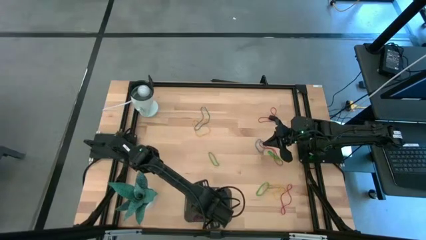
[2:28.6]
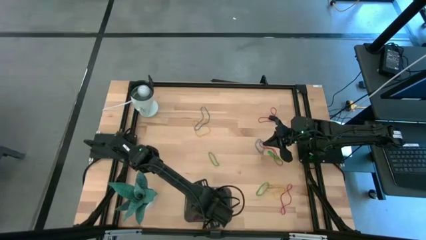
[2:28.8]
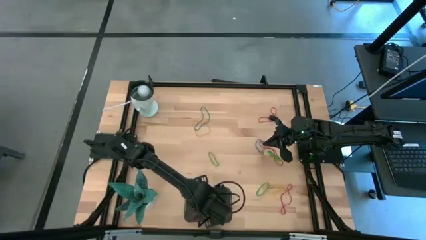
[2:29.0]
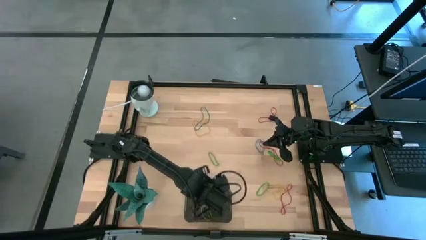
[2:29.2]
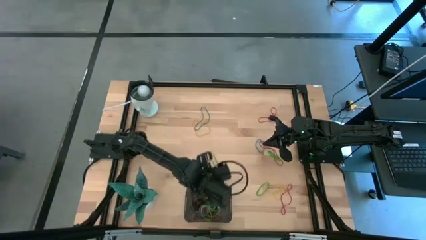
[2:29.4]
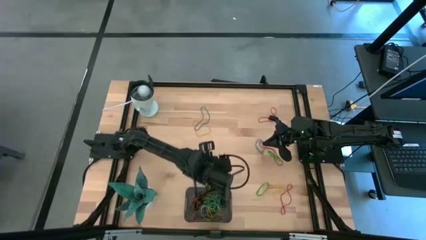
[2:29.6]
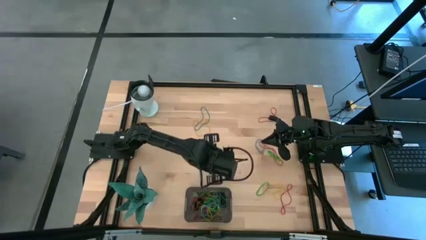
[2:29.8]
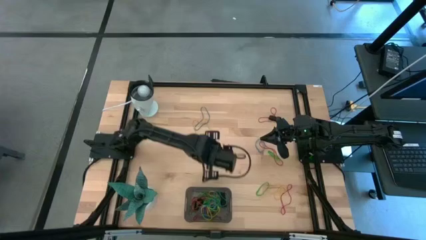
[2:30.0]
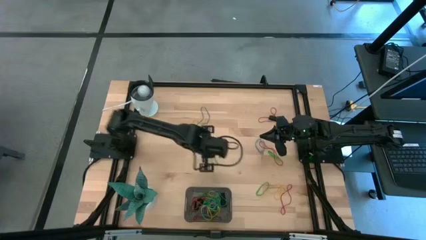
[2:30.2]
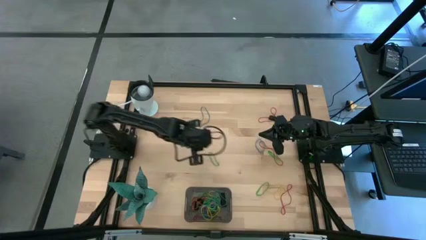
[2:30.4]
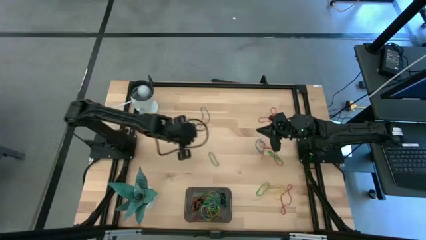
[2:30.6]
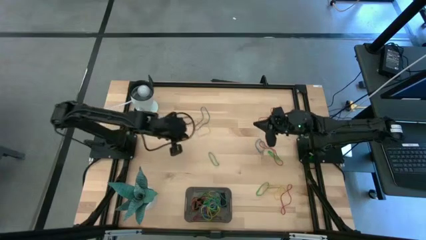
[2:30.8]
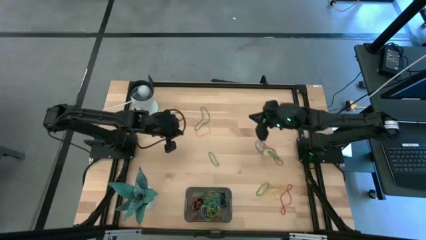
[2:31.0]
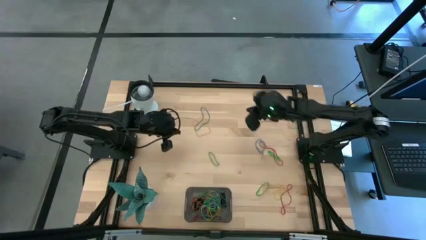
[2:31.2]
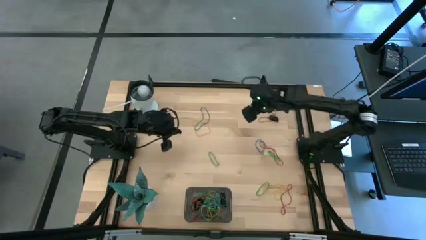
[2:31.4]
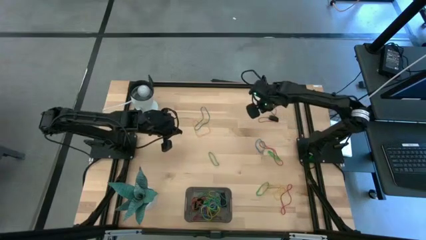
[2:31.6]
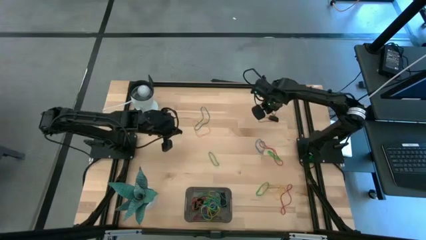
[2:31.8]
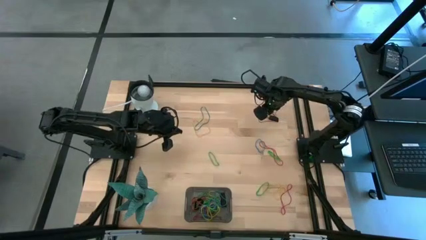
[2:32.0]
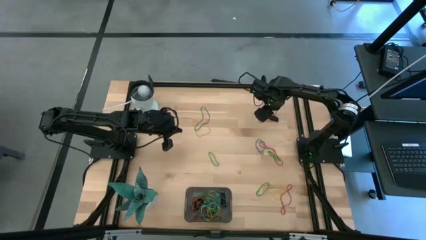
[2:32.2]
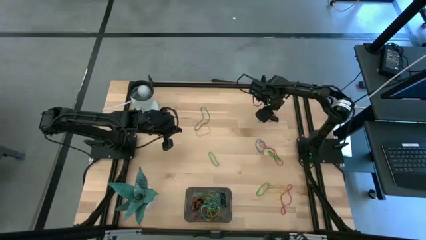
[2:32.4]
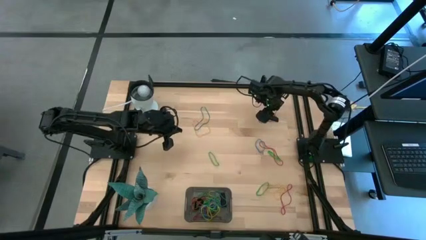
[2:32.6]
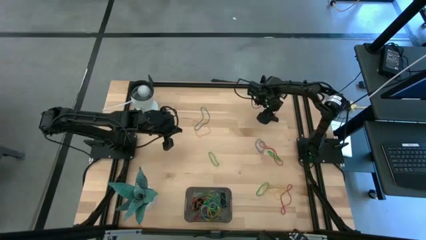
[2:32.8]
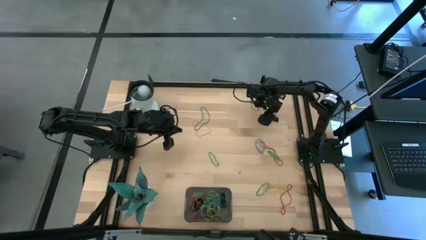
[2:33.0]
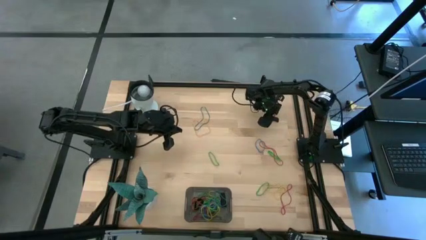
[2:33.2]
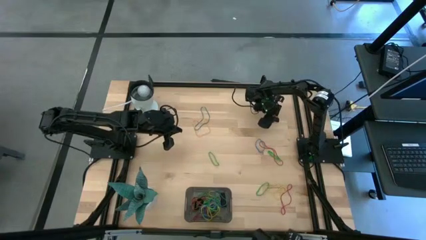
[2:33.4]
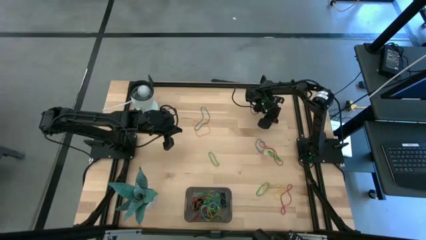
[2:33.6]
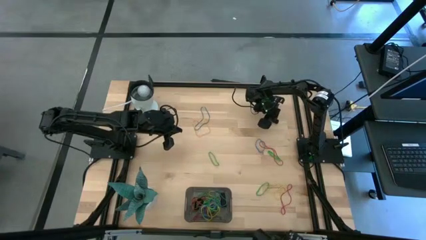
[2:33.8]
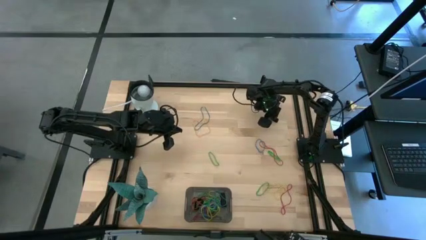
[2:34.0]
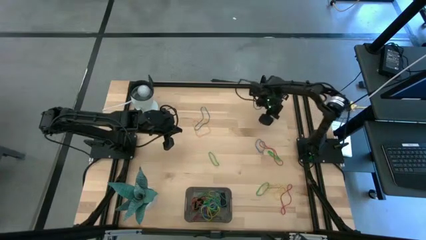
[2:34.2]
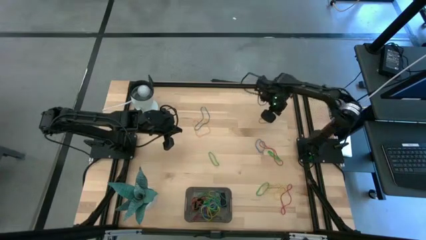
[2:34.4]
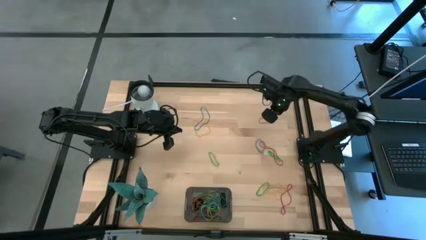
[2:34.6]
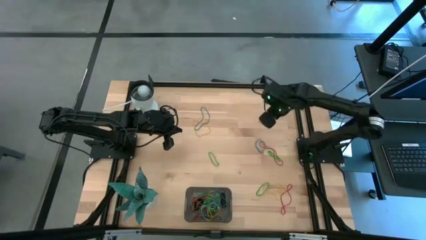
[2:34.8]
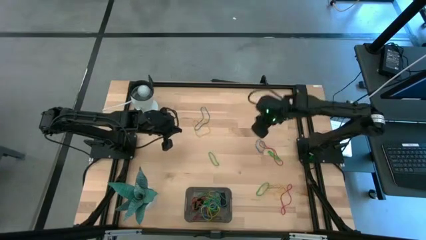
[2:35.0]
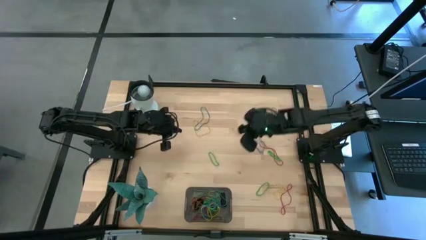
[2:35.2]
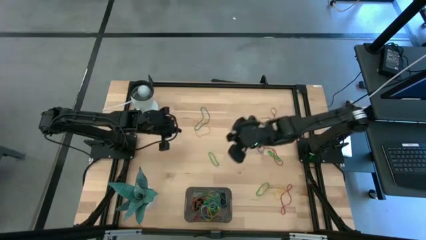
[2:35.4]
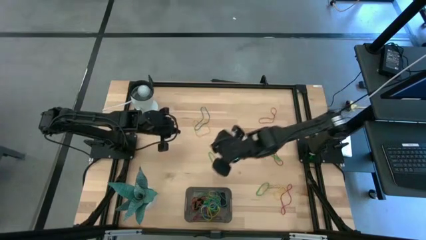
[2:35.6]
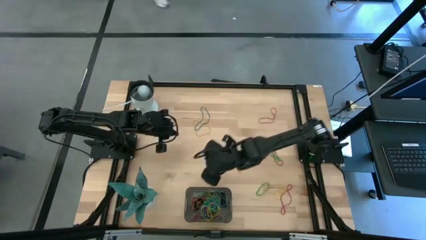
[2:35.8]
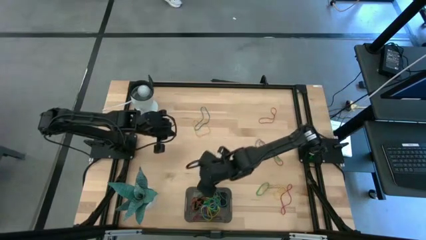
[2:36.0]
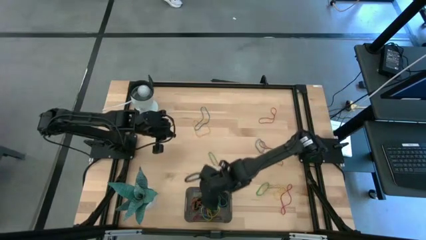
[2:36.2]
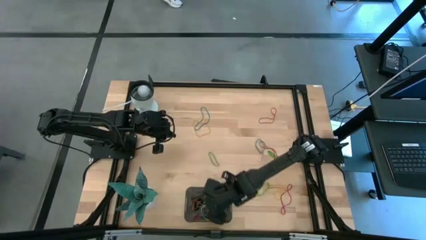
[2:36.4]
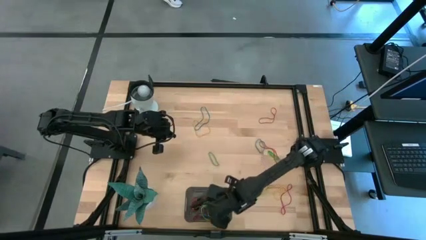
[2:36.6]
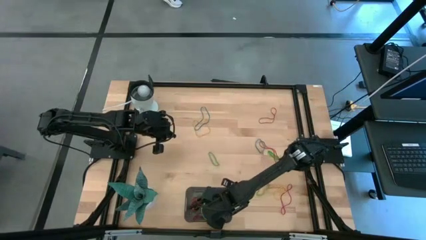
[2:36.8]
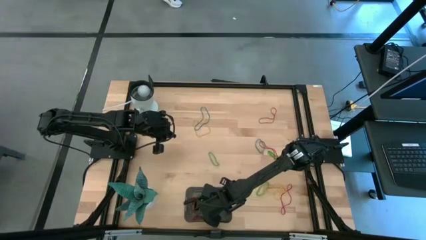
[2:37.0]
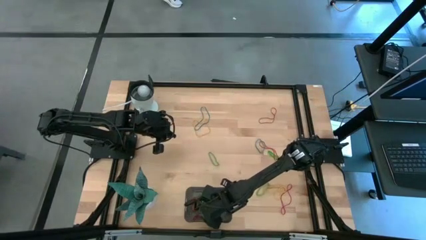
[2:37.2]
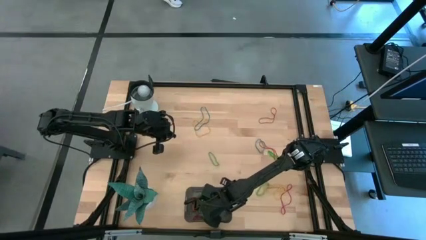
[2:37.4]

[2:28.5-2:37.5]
Task: Pick and place rubber bands into bin
Put the black rubber band into the black bin

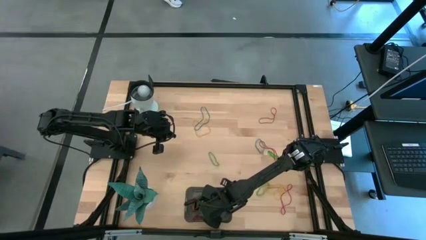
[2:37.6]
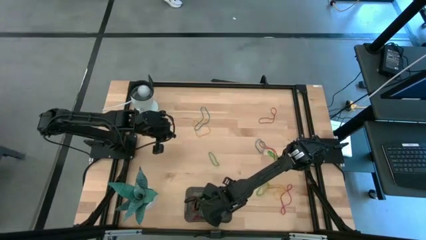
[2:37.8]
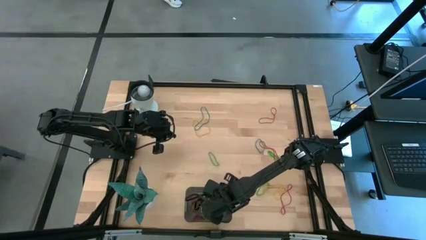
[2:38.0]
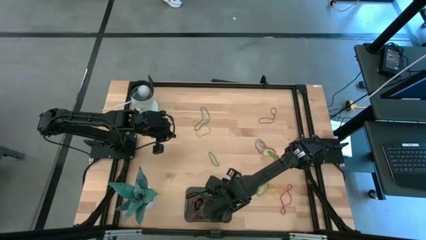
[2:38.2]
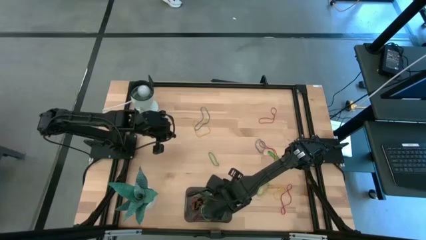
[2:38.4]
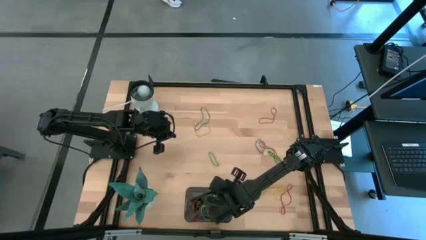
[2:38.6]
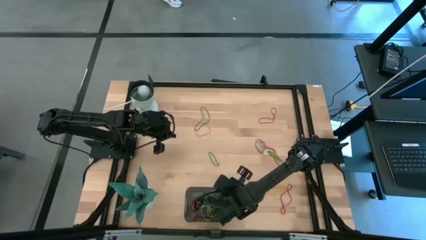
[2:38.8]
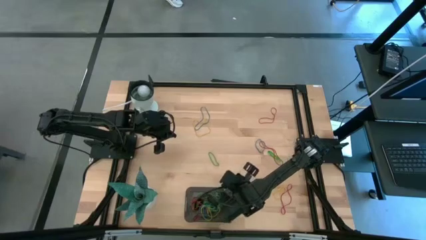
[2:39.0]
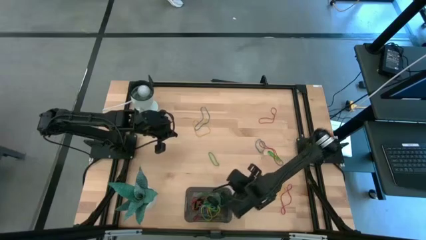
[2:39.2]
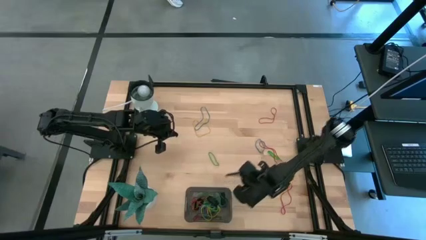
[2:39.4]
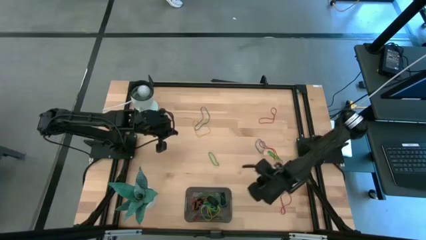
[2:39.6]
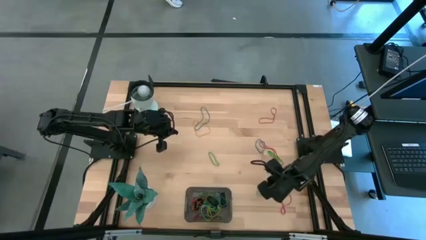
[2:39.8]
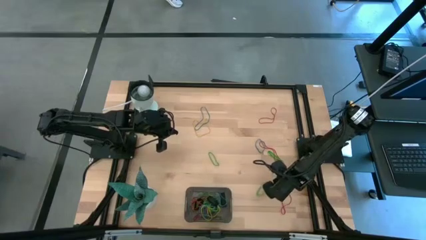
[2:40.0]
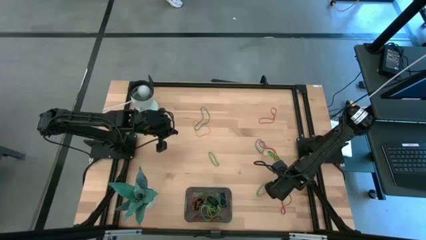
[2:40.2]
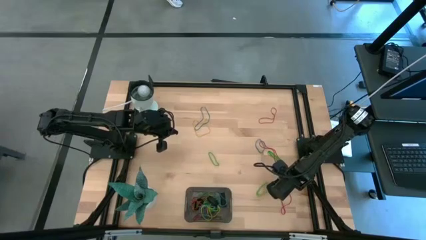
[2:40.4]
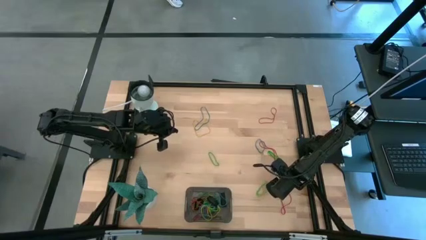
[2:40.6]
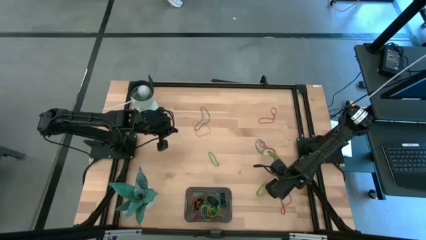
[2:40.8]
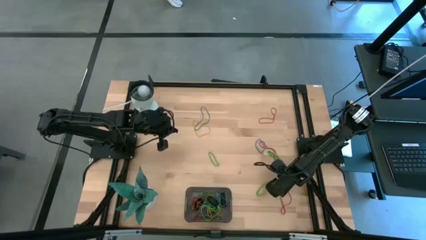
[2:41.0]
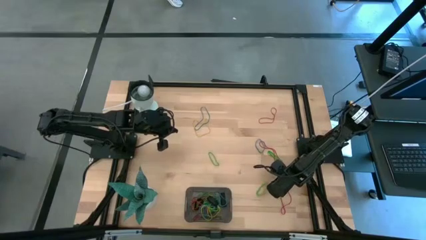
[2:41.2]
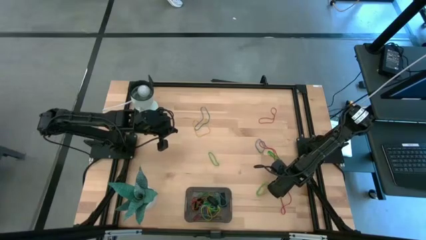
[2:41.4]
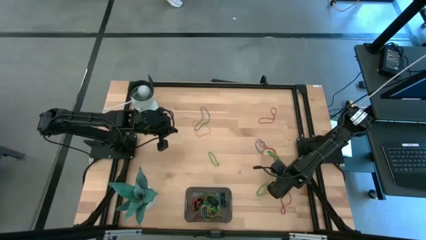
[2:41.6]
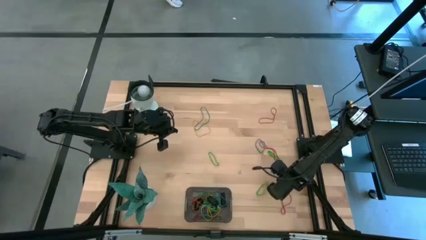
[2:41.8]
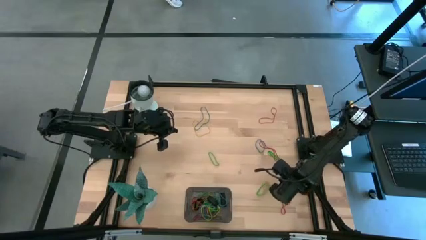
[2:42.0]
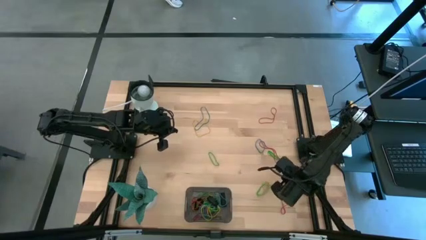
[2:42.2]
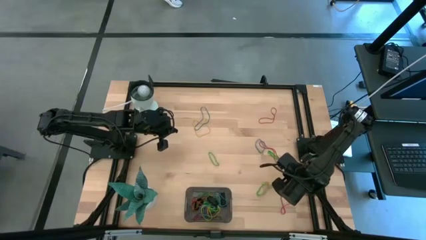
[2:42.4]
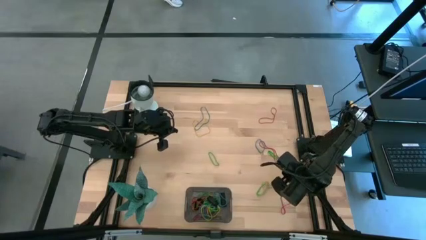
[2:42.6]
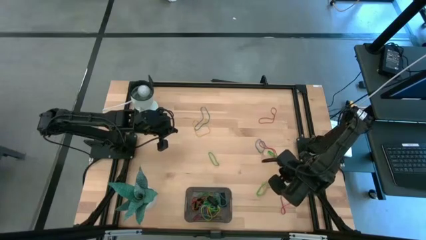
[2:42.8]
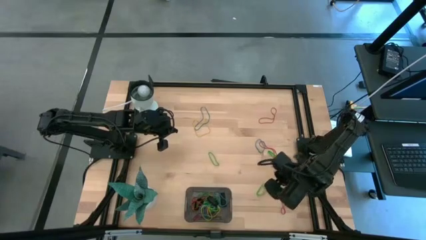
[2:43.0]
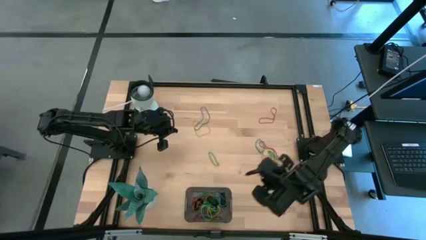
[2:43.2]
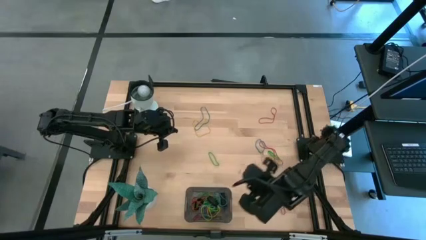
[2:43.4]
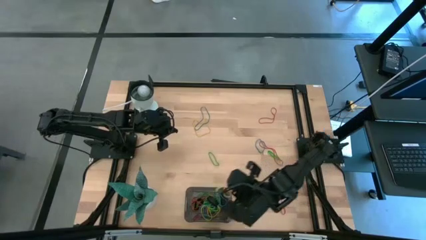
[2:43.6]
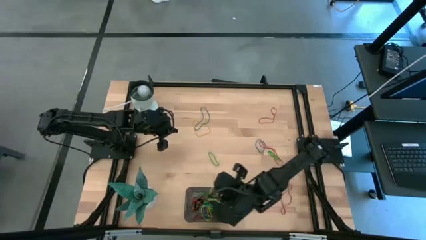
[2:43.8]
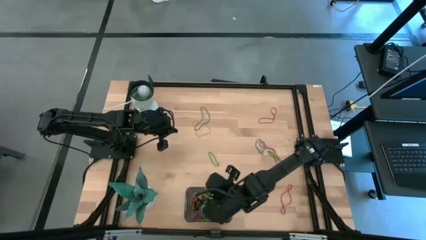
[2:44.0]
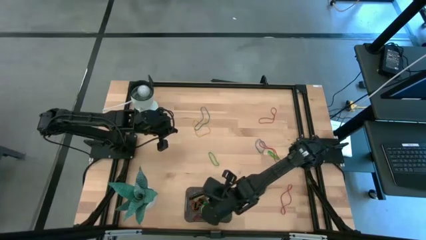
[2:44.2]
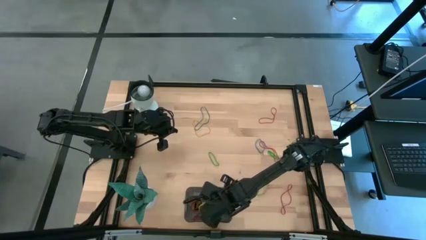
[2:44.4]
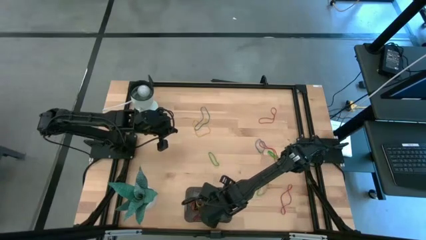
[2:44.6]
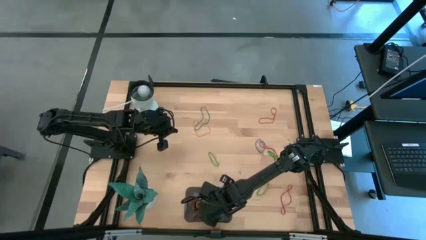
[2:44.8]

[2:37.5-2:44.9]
Put the yellow rubber band into the black bin
